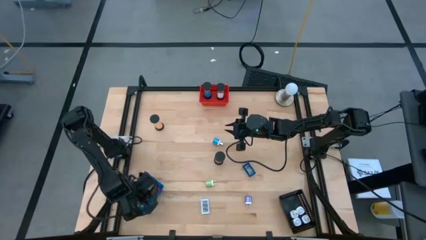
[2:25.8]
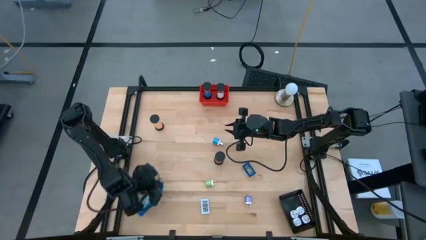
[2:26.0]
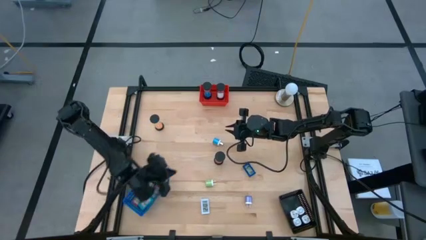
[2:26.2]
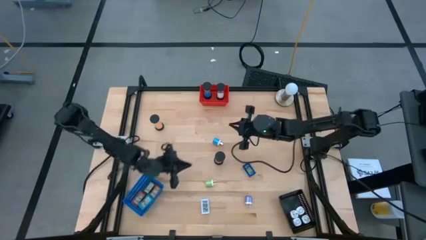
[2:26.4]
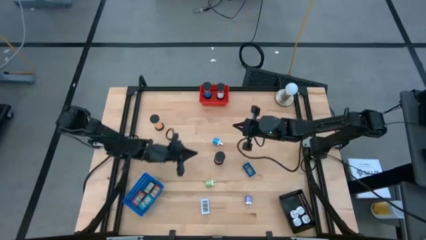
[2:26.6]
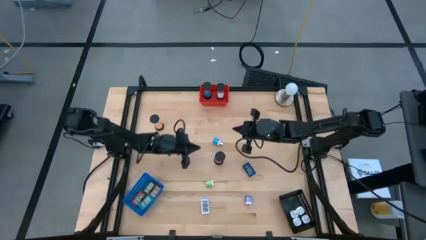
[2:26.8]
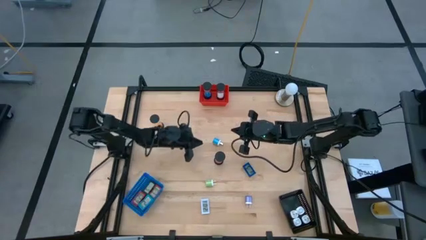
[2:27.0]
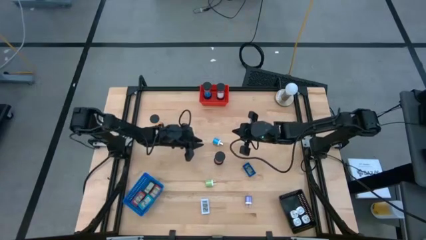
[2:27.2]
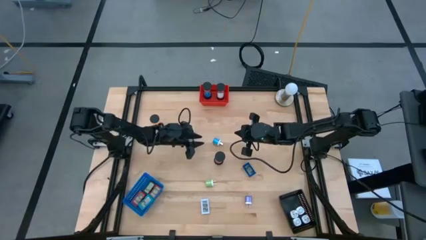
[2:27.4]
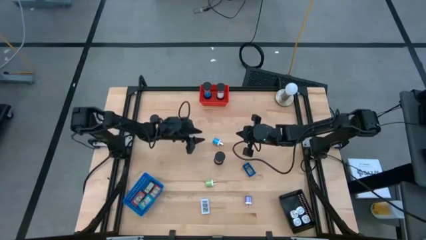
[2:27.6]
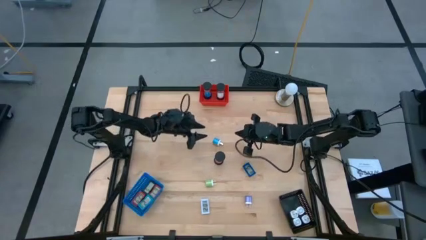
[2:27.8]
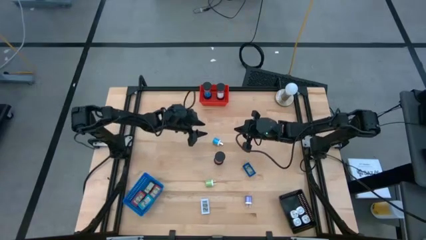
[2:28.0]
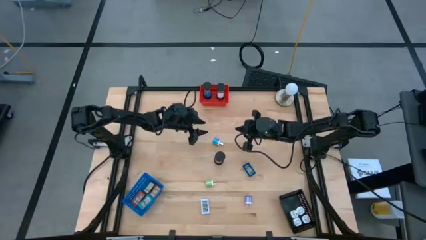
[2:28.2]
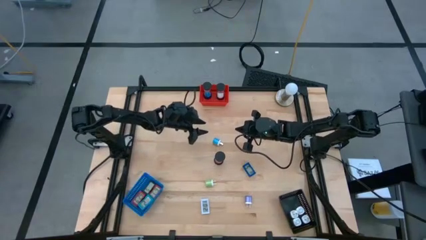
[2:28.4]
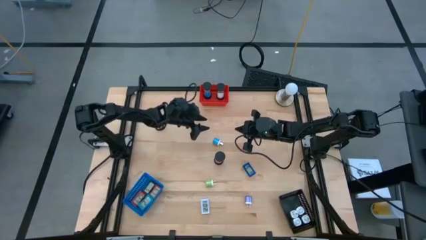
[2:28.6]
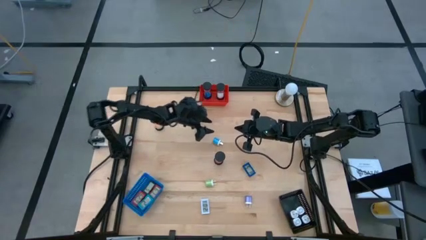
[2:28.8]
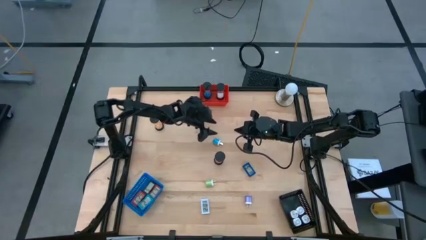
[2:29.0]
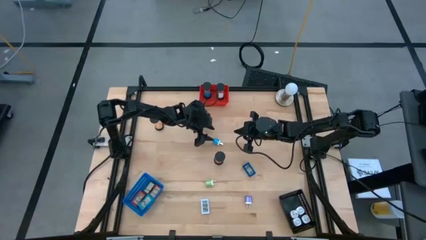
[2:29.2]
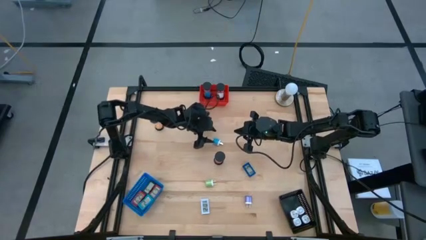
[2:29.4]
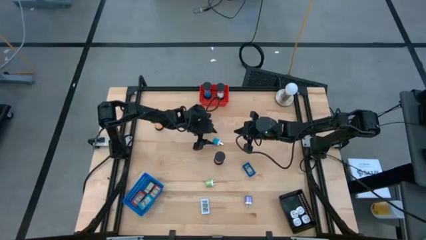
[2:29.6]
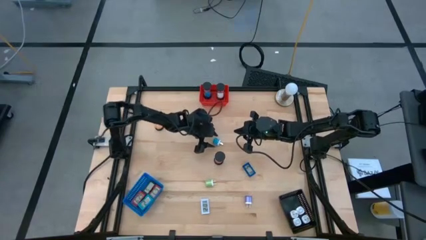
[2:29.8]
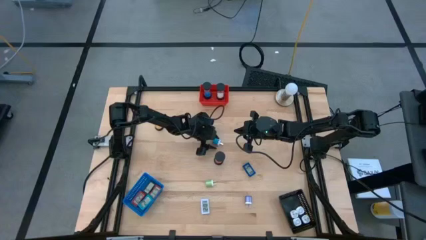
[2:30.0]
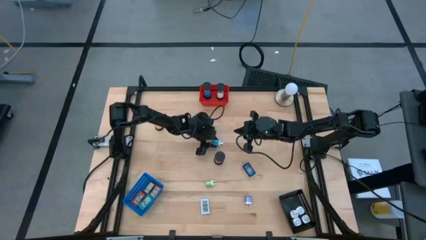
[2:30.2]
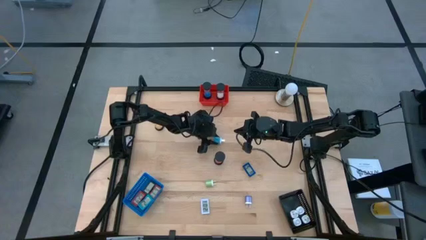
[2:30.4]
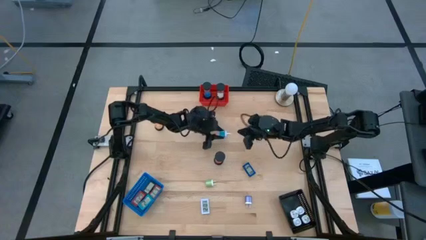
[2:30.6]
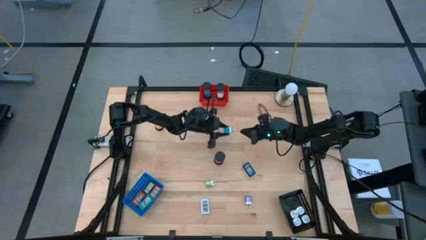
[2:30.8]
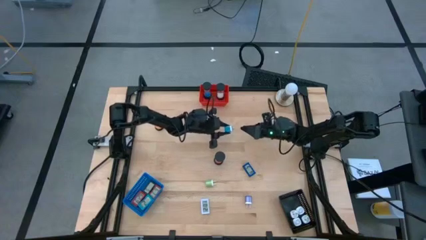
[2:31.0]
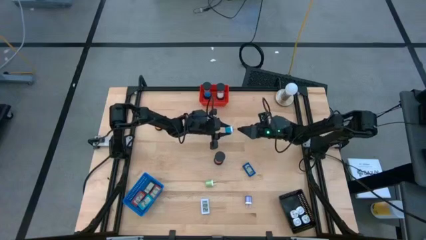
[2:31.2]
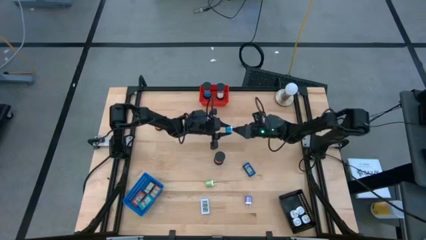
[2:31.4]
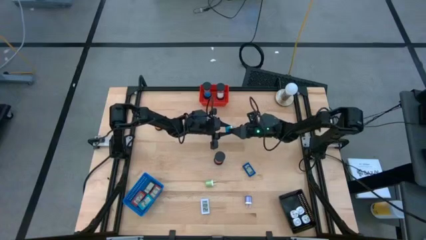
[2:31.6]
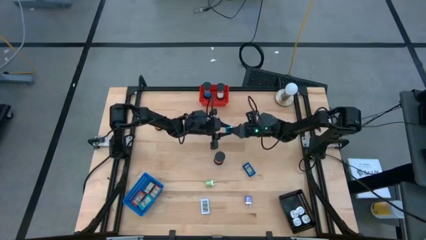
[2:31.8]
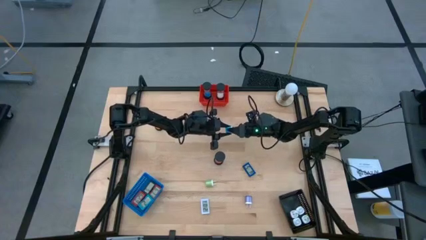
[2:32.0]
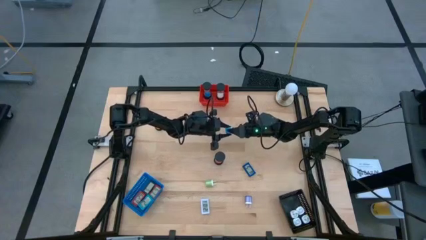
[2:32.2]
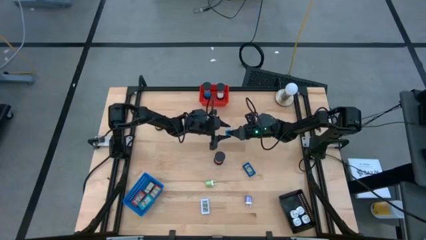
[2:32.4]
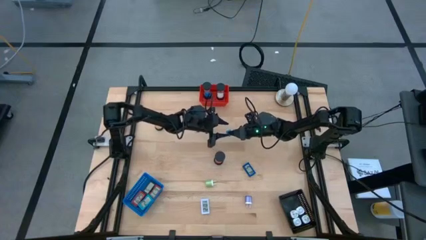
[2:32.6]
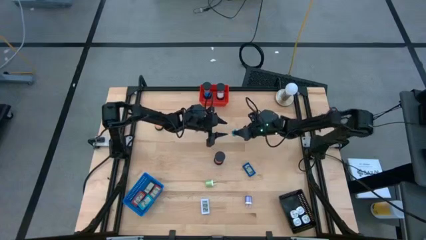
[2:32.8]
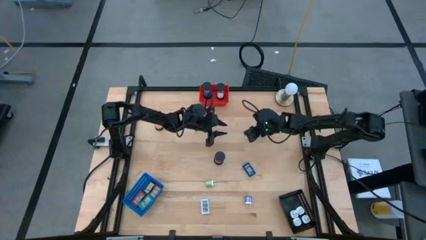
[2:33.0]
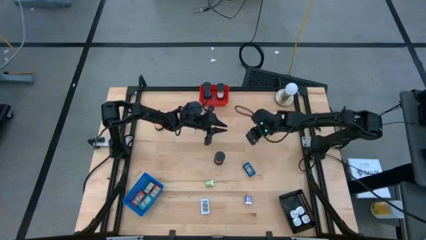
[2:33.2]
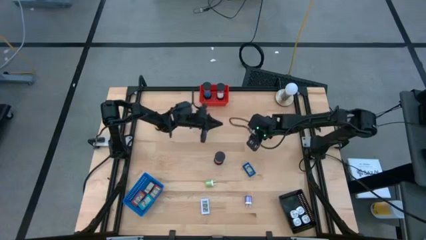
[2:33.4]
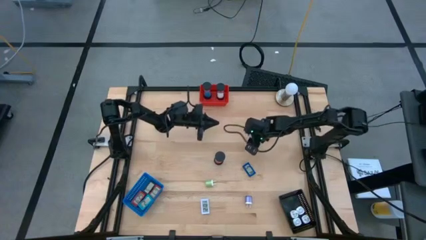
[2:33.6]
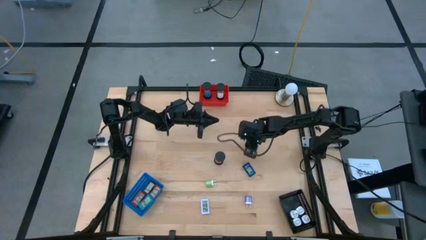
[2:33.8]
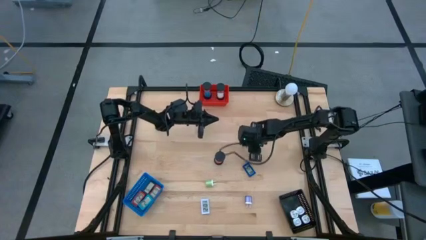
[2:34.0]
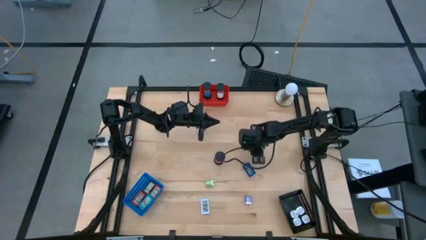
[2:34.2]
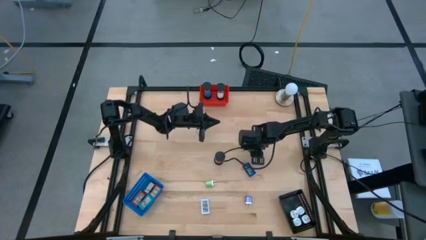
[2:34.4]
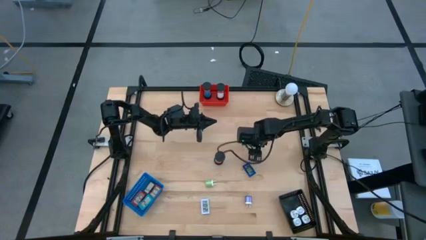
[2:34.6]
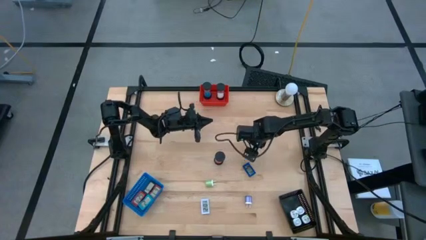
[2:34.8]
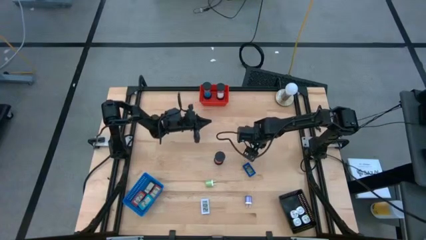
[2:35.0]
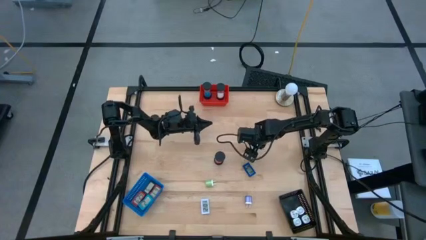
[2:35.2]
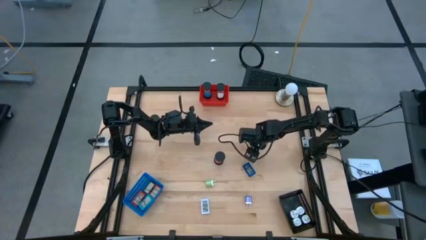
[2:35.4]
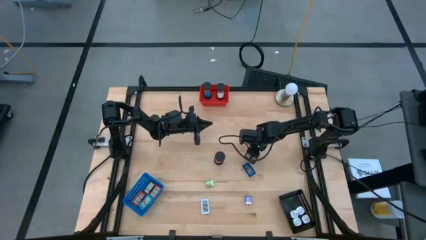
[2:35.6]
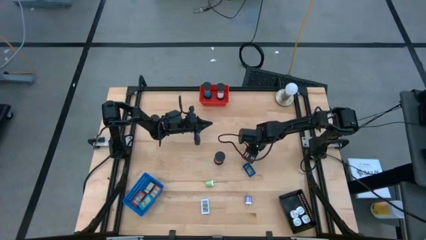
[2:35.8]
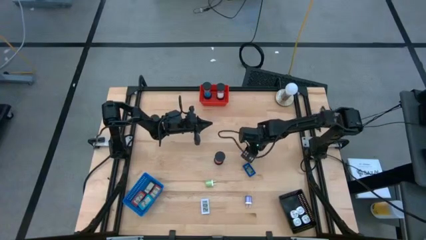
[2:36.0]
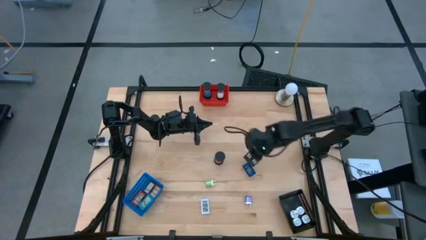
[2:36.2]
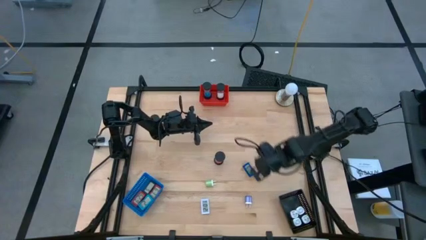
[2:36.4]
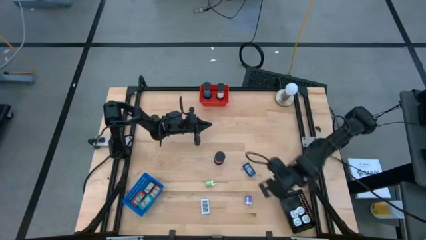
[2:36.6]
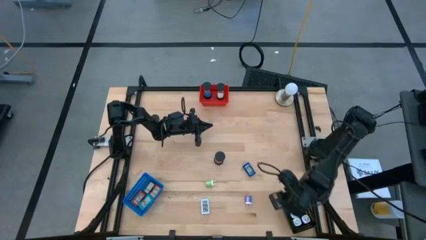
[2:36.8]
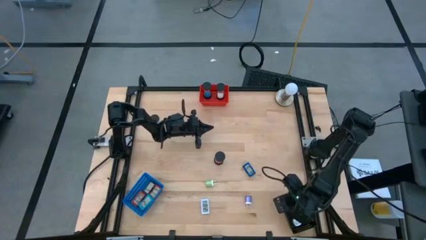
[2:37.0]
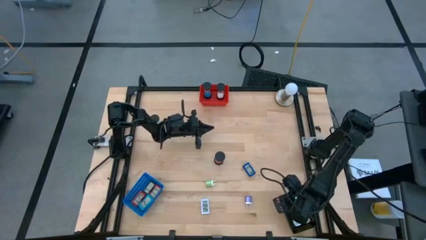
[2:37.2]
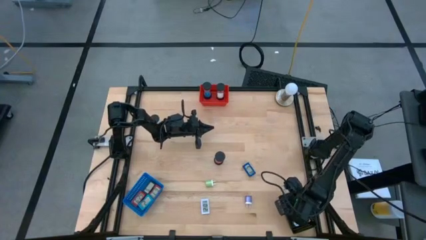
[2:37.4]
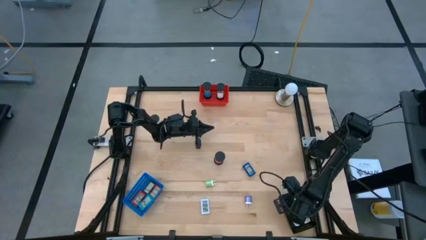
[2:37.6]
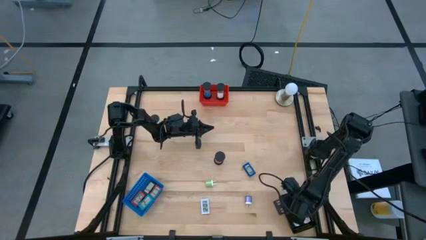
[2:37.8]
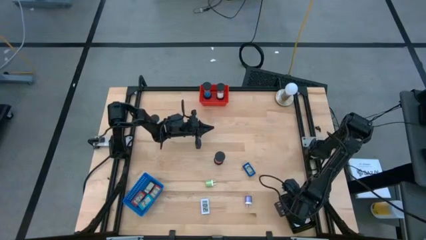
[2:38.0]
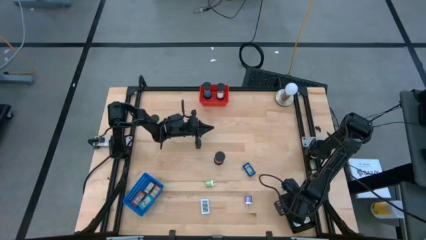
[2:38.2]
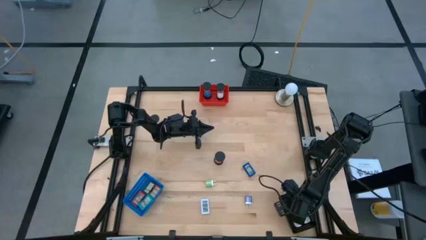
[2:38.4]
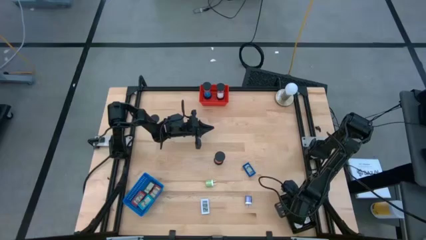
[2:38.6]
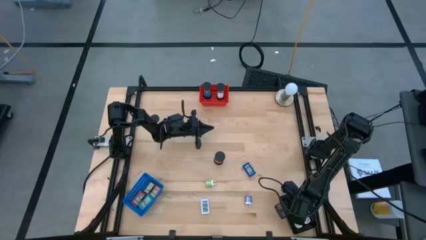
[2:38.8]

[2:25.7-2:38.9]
Task: Pick & Place Office items
Put the light blue charger adapter into the black bin
